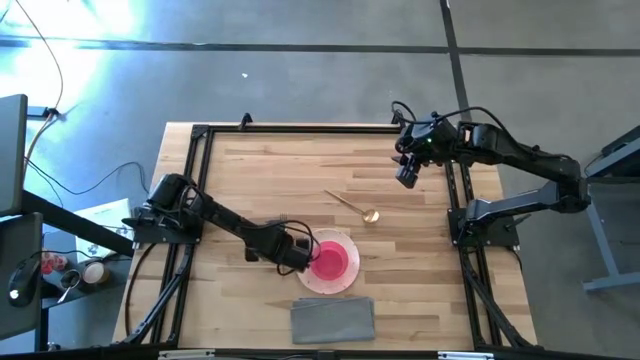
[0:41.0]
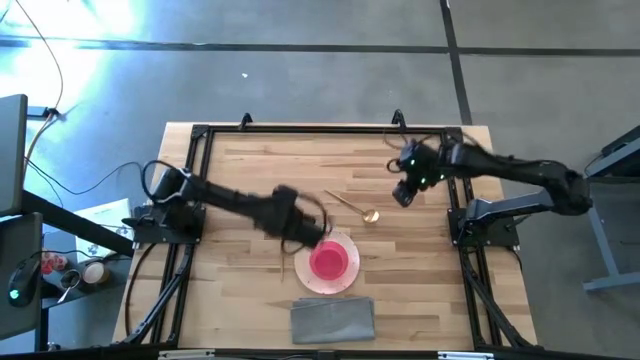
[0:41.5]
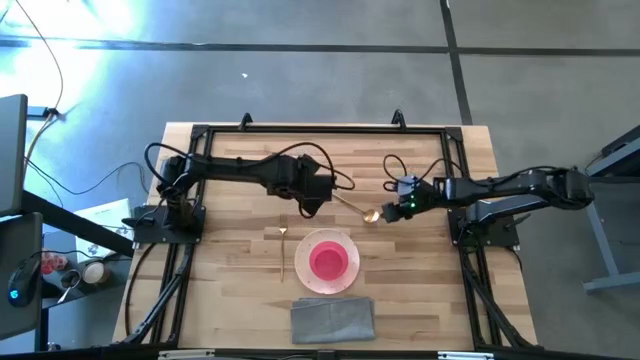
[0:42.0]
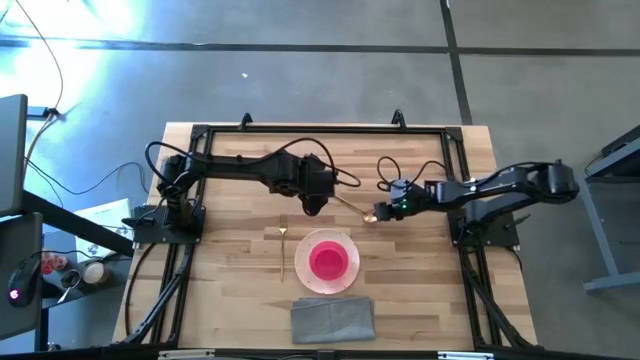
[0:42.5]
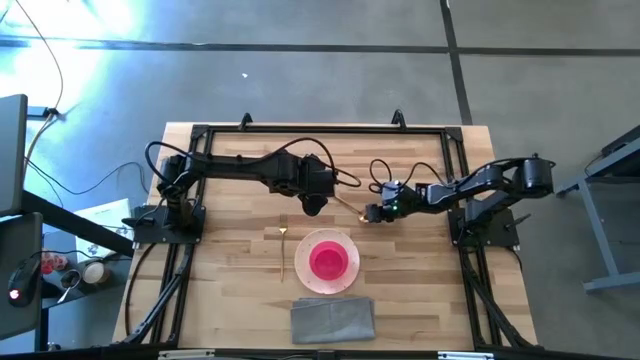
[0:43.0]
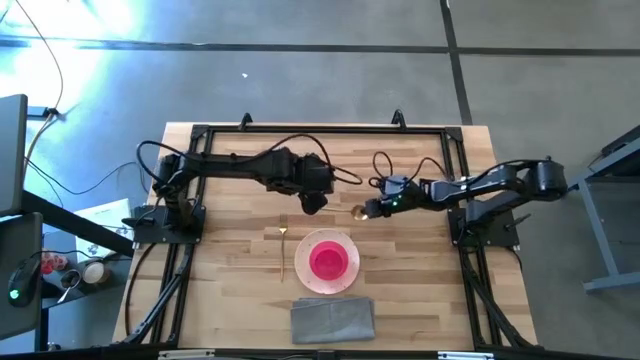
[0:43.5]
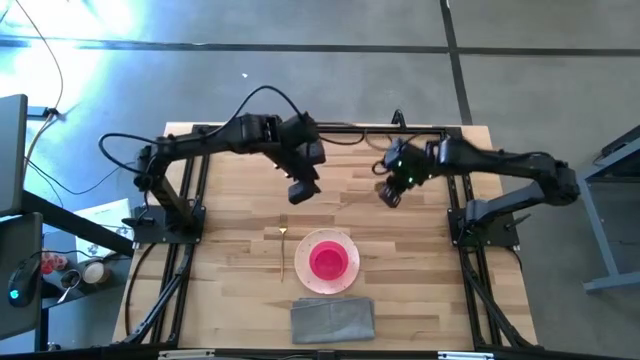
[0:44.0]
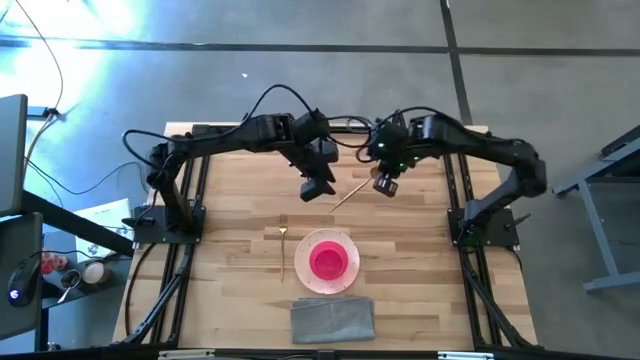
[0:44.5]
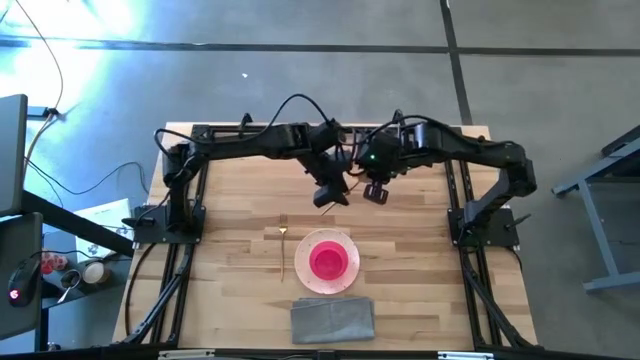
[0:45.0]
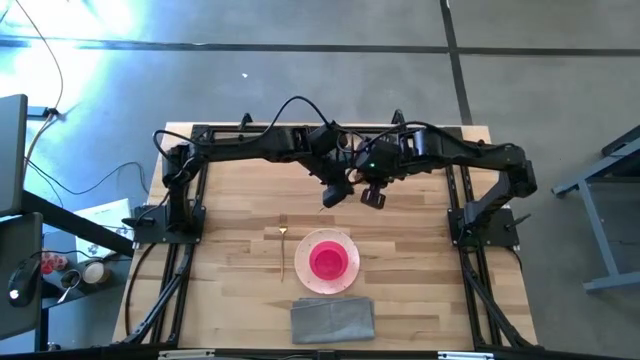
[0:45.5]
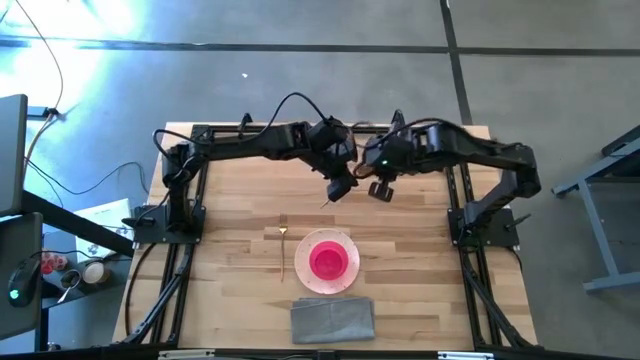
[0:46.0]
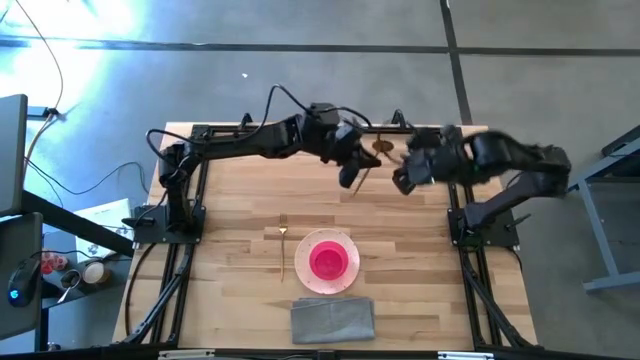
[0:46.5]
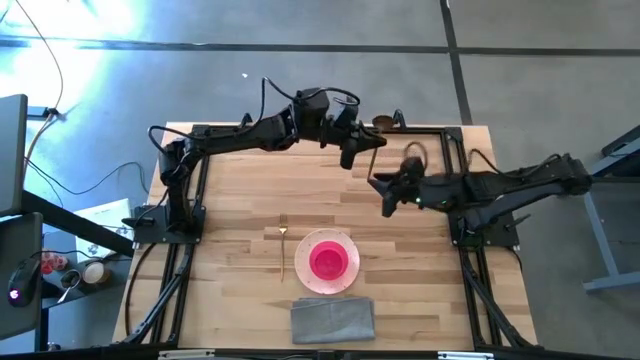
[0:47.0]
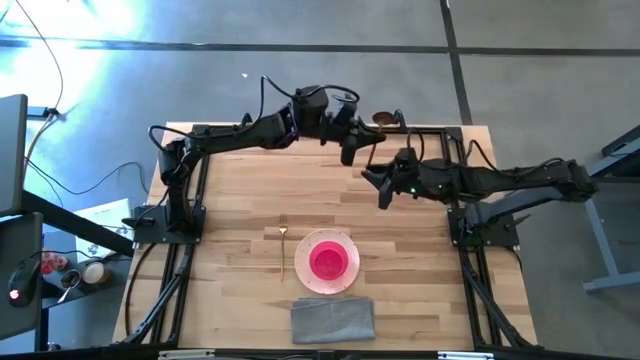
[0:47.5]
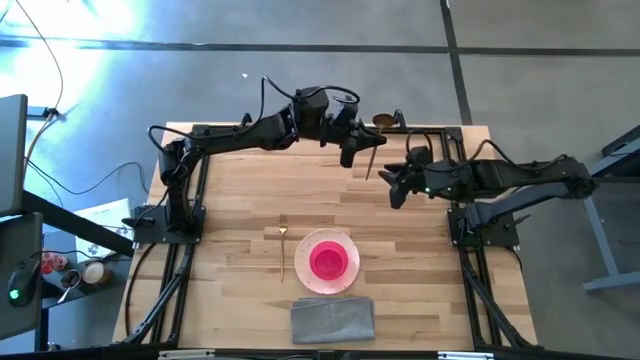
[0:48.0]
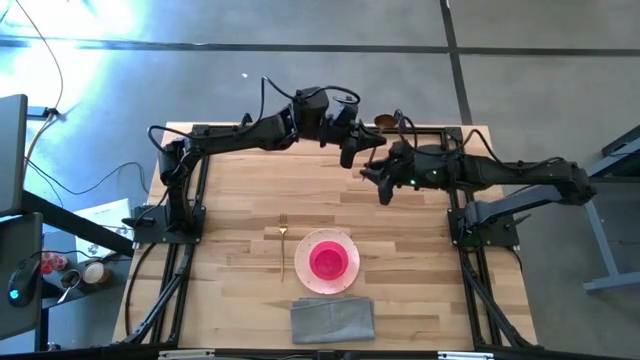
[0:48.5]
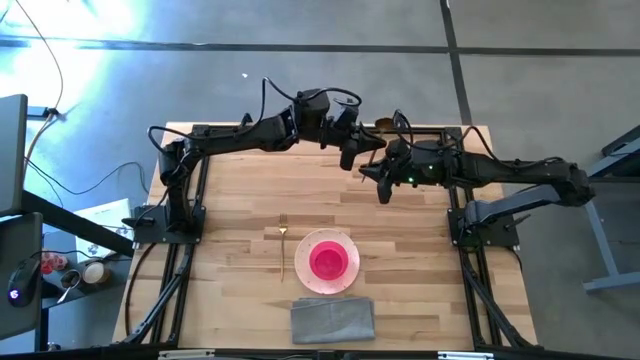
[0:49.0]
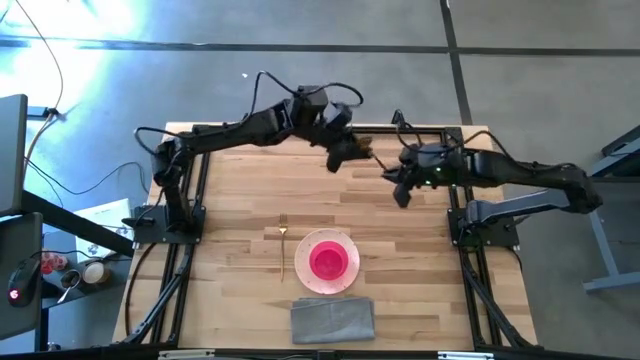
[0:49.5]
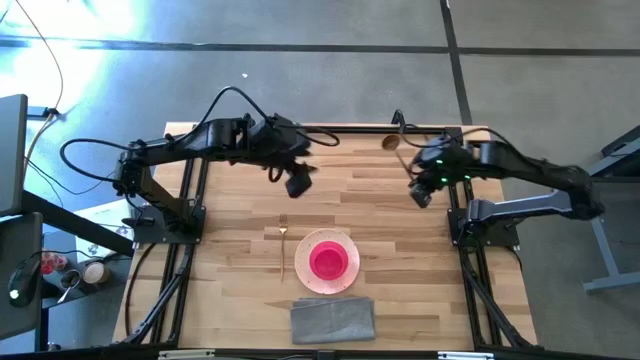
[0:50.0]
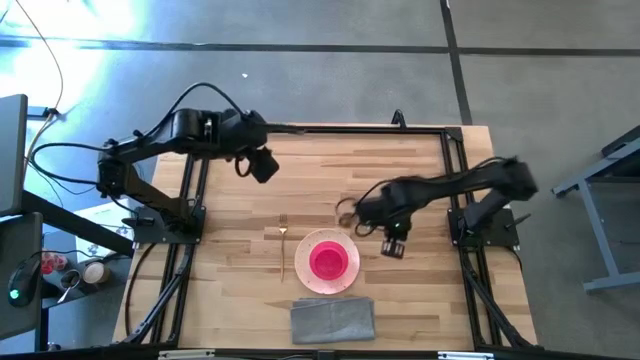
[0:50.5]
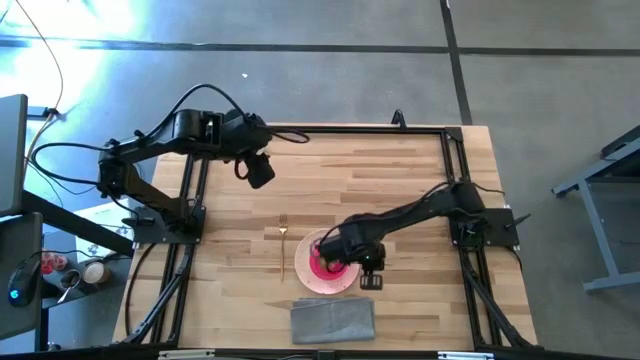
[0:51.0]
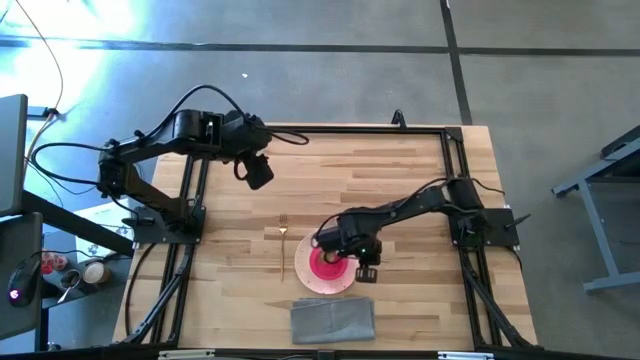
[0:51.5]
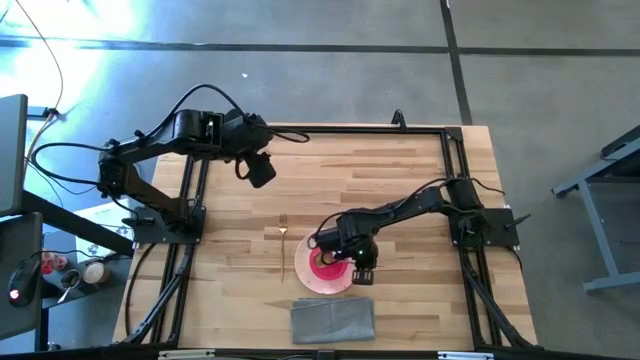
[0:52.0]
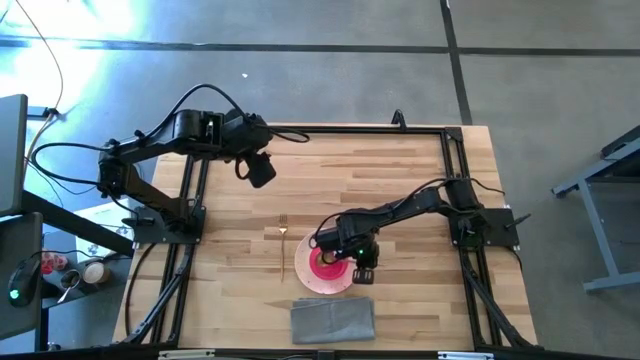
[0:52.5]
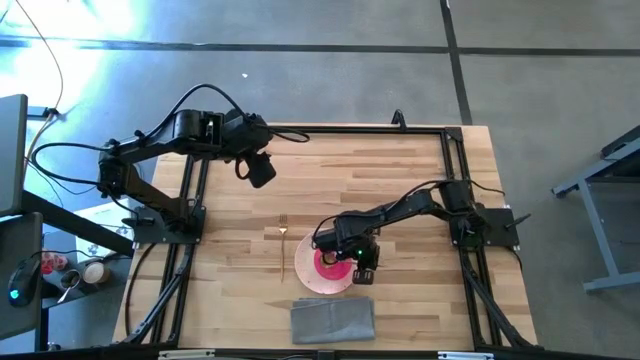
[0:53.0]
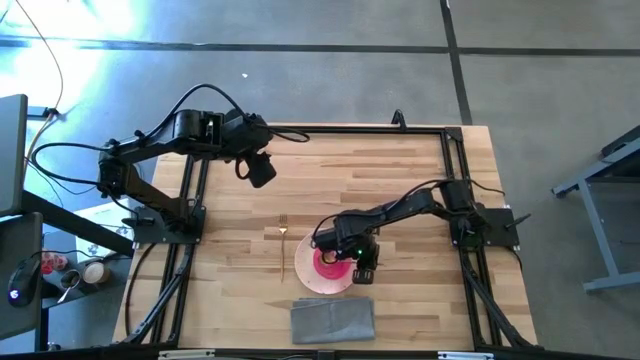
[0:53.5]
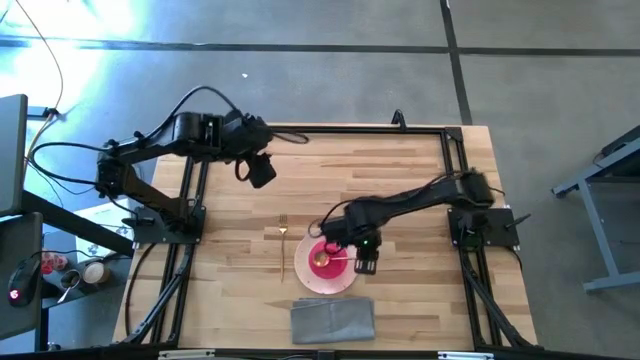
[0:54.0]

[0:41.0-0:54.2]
Task: Set table place
Put the gold spoon into the pink bowl

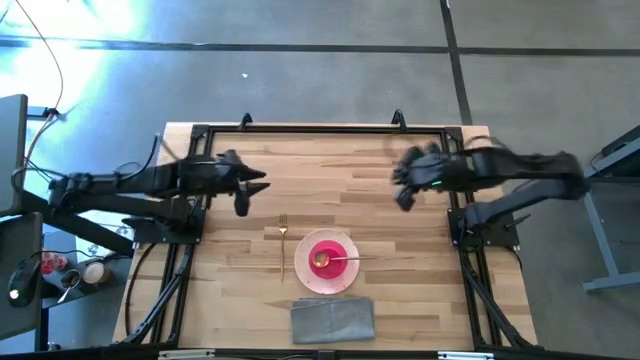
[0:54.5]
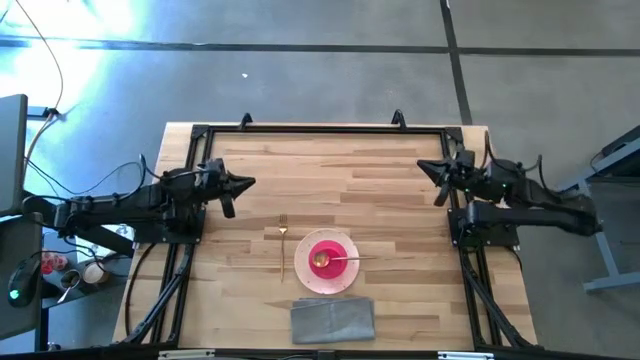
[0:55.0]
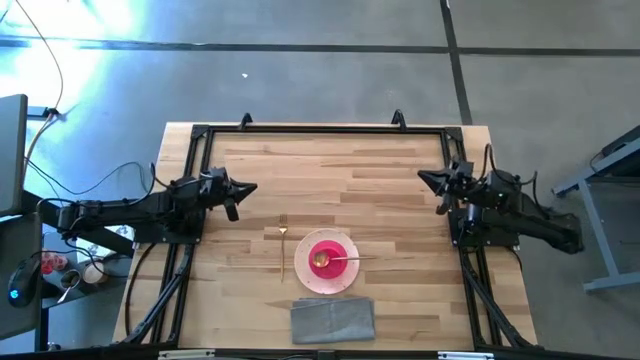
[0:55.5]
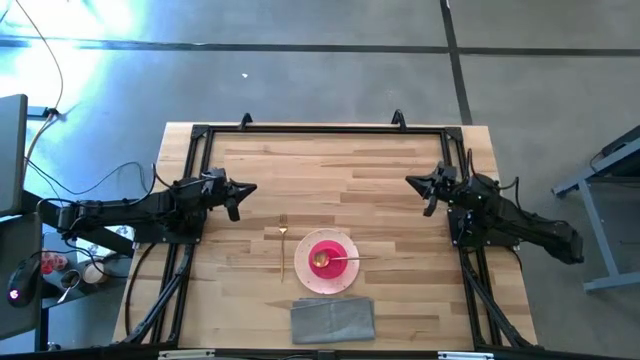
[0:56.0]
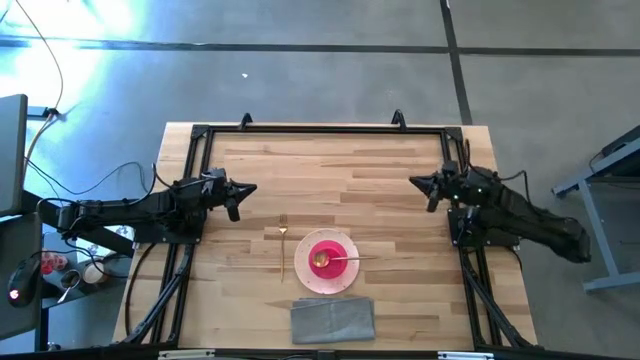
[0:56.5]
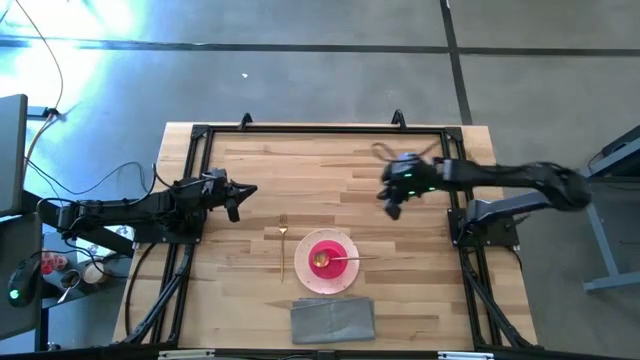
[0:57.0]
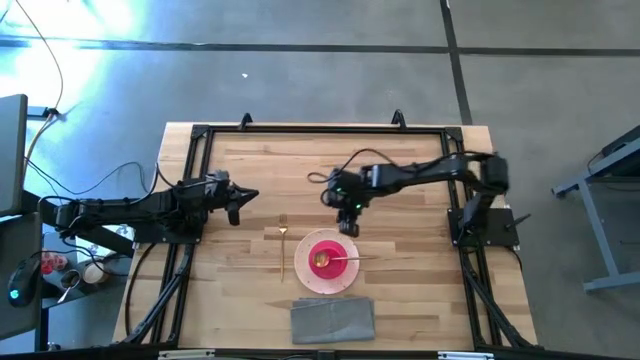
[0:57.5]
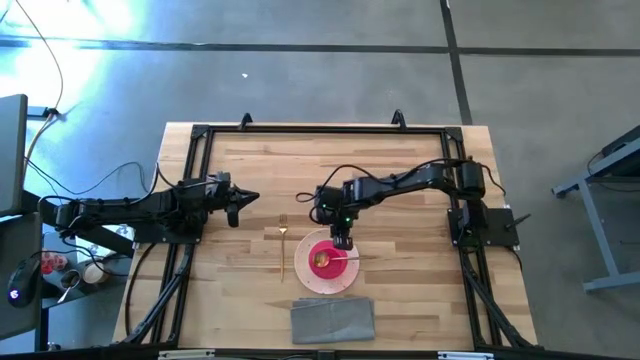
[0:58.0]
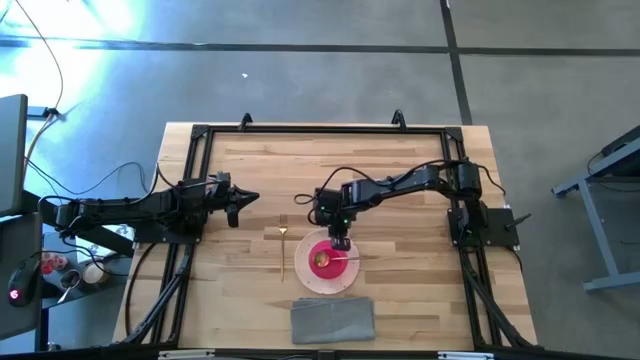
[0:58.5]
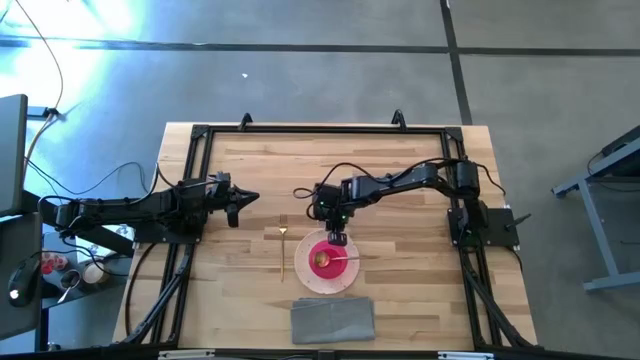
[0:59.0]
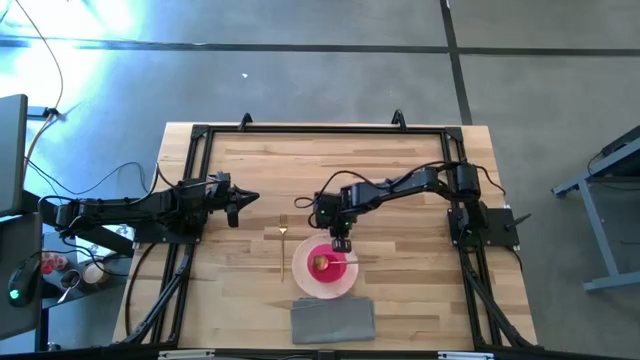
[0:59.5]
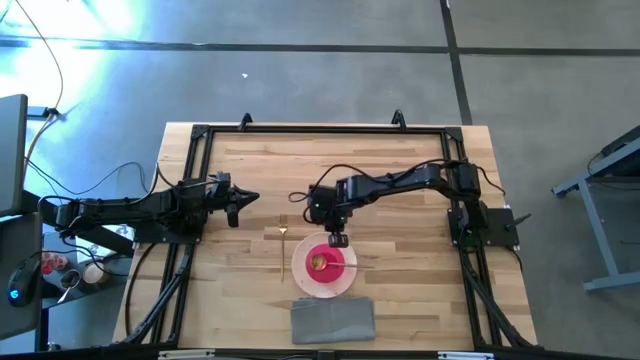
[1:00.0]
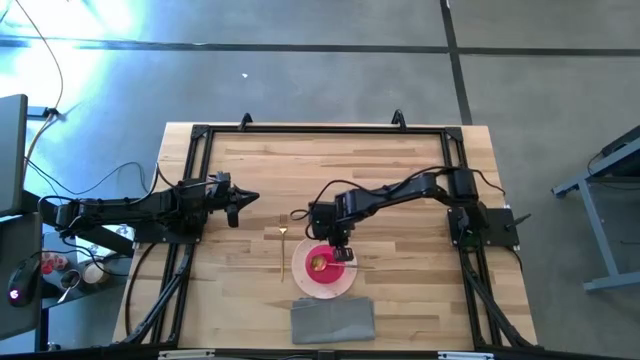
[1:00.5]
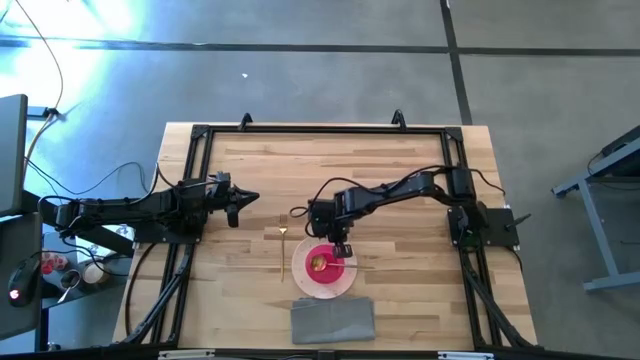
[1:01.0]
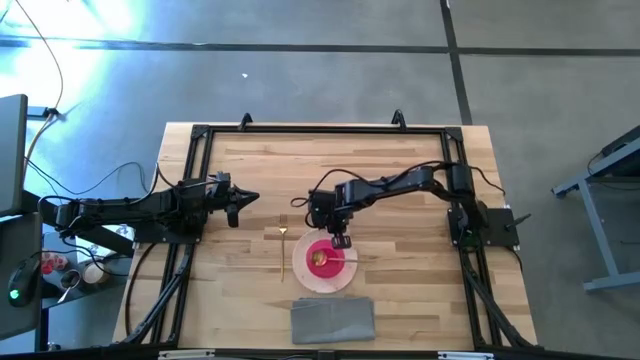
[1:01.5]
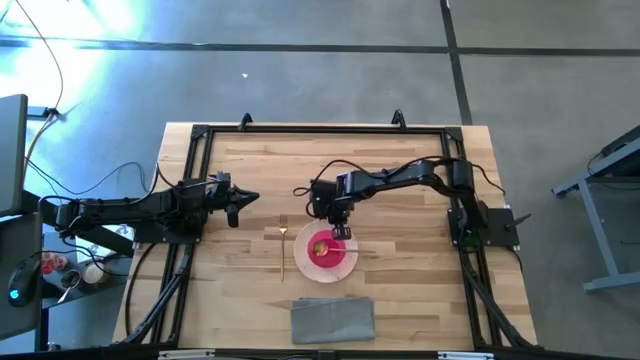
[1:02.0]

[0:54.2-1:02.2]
Adjust the white plate
